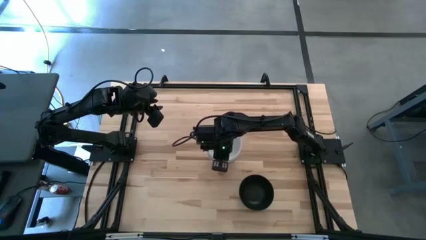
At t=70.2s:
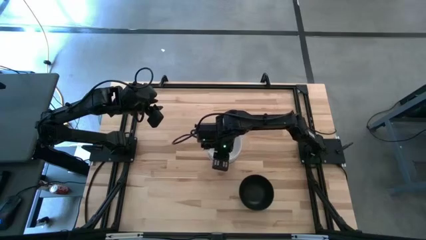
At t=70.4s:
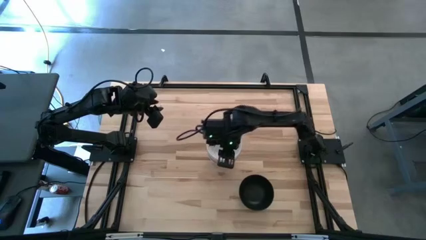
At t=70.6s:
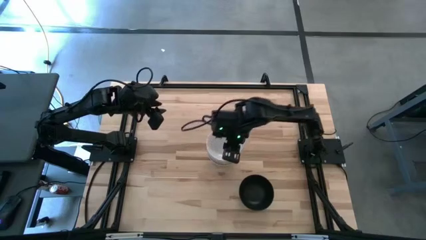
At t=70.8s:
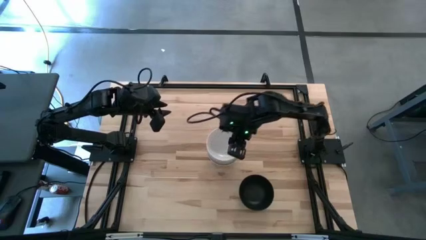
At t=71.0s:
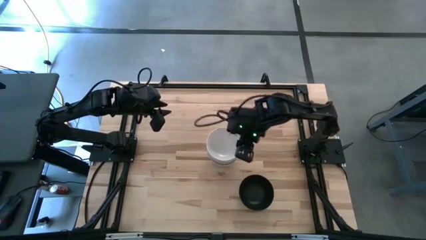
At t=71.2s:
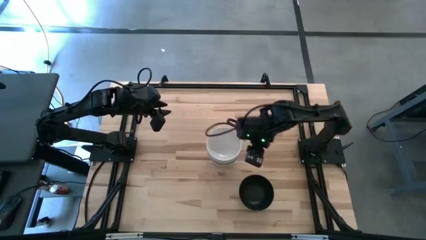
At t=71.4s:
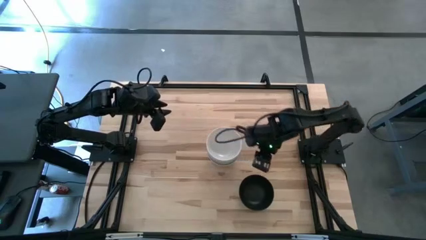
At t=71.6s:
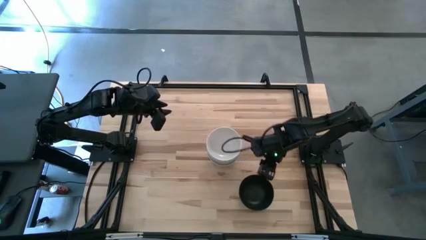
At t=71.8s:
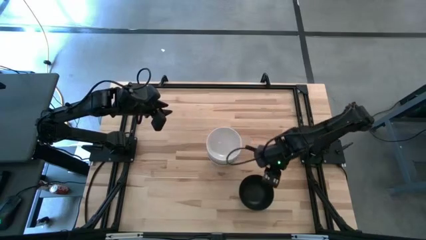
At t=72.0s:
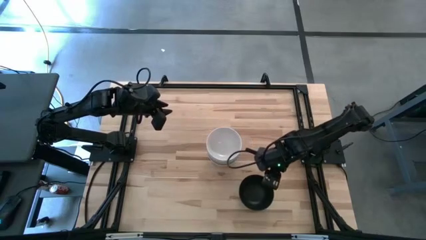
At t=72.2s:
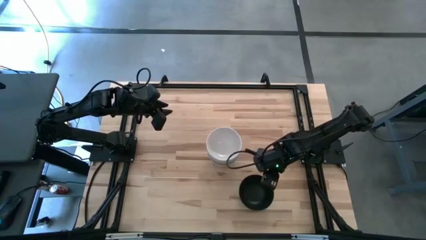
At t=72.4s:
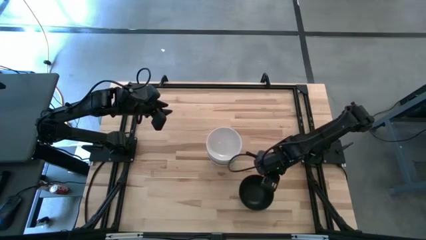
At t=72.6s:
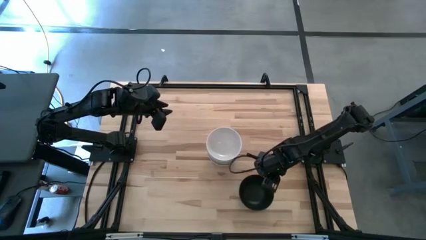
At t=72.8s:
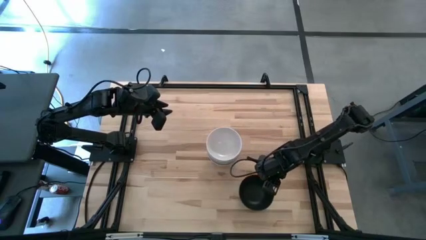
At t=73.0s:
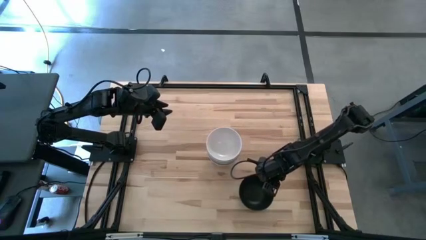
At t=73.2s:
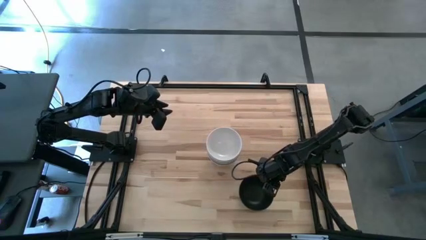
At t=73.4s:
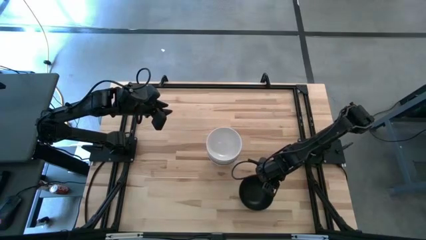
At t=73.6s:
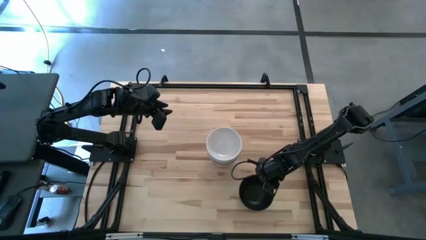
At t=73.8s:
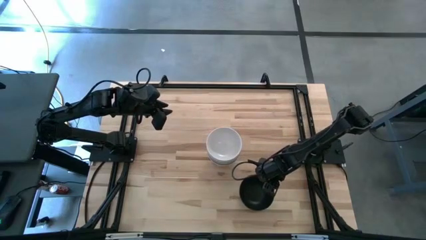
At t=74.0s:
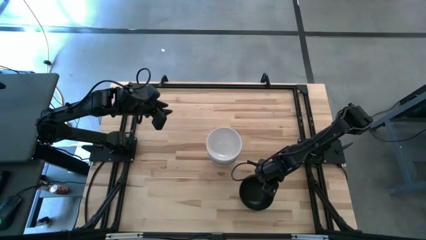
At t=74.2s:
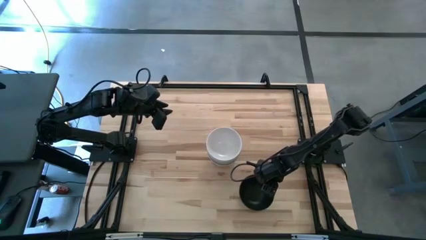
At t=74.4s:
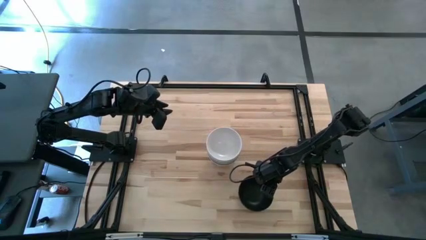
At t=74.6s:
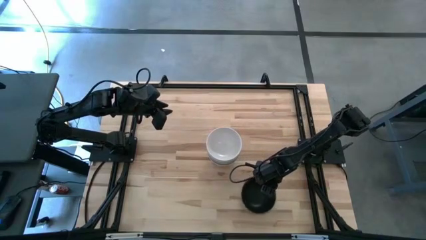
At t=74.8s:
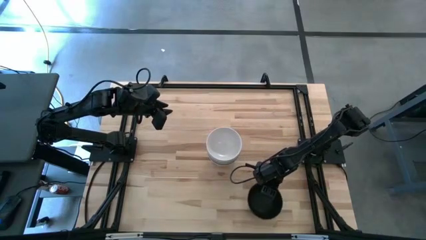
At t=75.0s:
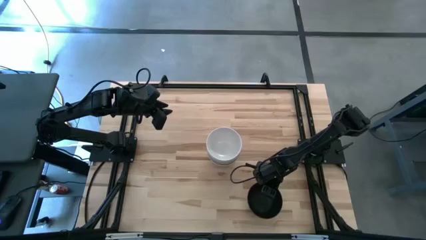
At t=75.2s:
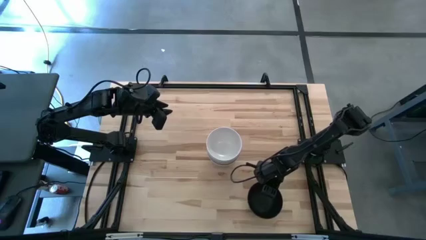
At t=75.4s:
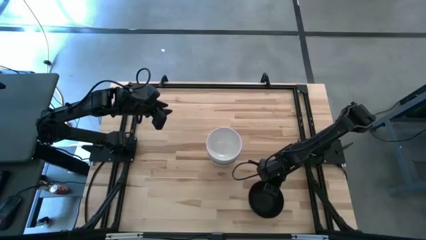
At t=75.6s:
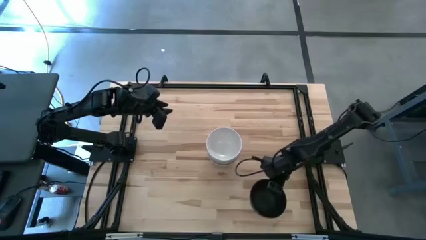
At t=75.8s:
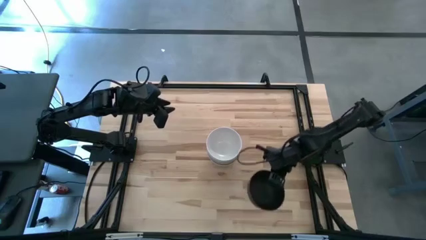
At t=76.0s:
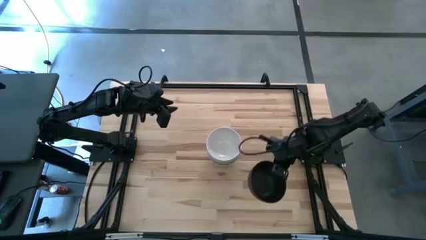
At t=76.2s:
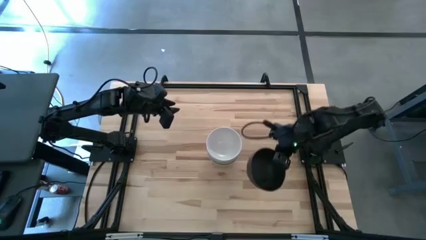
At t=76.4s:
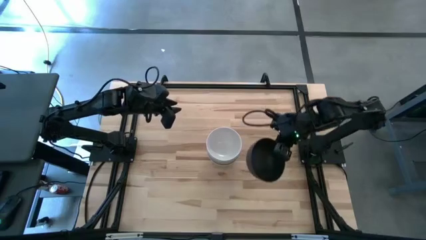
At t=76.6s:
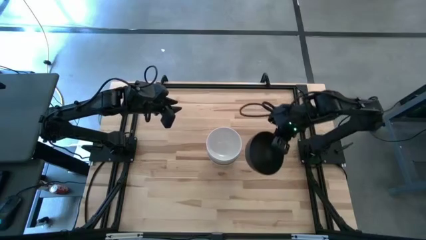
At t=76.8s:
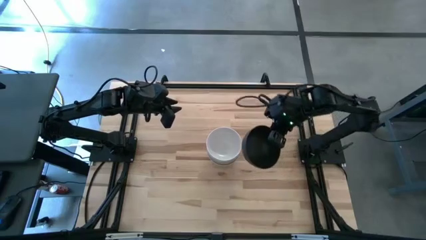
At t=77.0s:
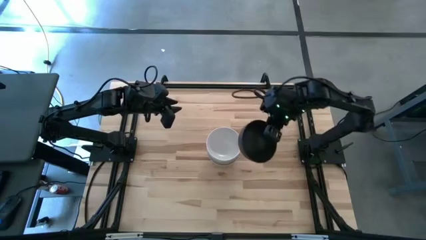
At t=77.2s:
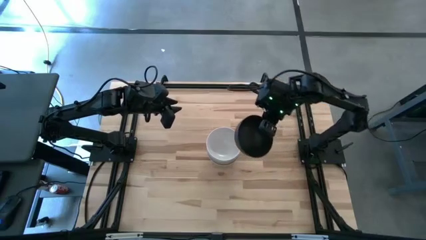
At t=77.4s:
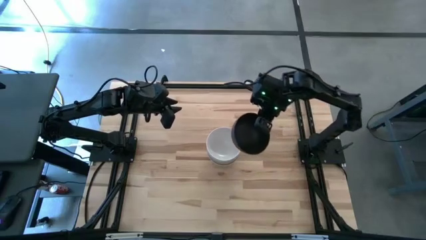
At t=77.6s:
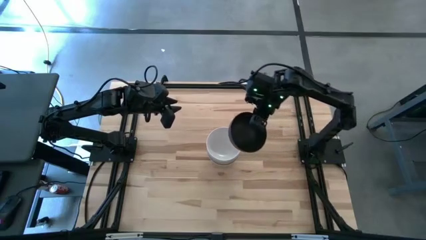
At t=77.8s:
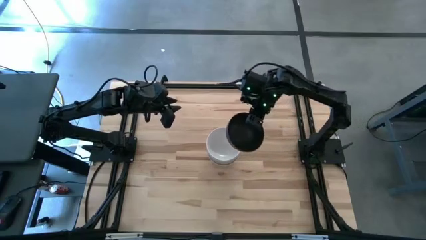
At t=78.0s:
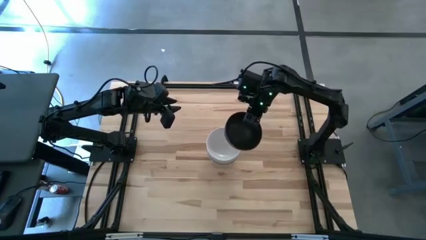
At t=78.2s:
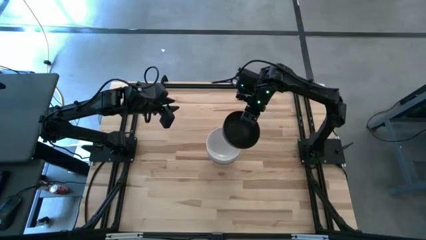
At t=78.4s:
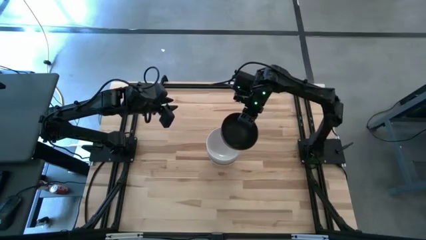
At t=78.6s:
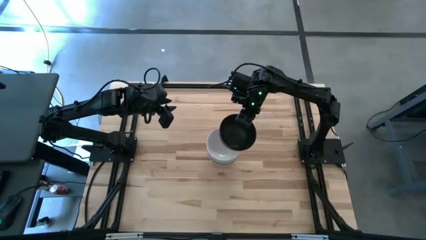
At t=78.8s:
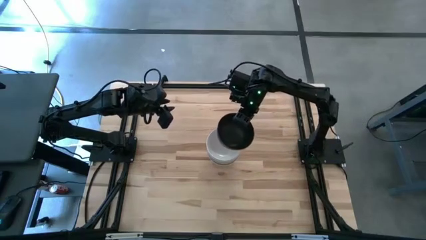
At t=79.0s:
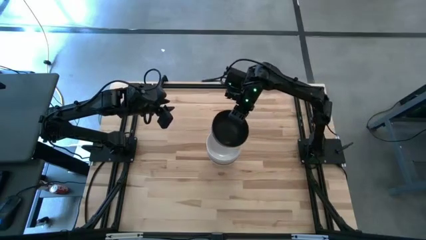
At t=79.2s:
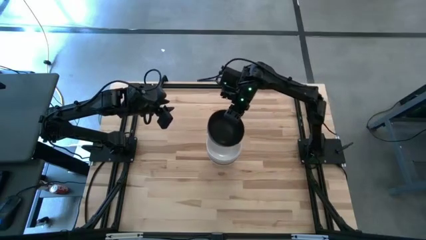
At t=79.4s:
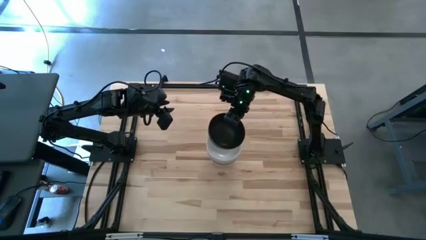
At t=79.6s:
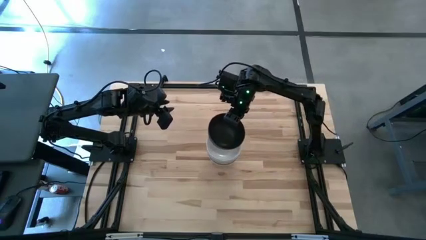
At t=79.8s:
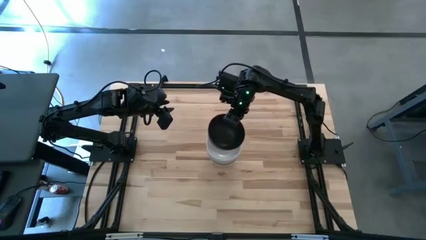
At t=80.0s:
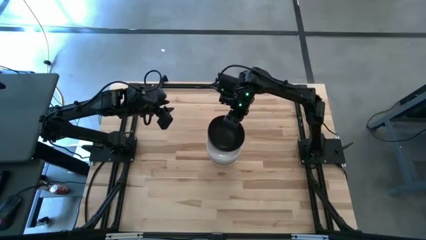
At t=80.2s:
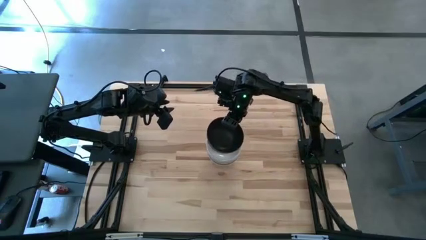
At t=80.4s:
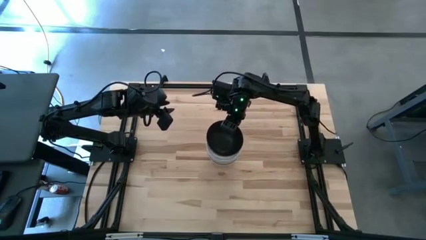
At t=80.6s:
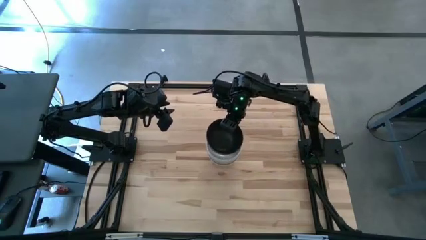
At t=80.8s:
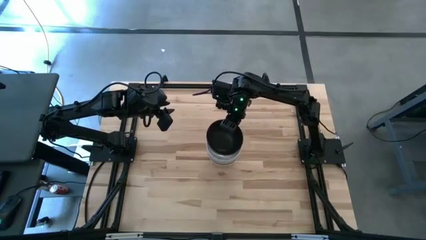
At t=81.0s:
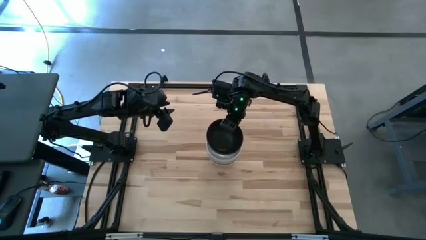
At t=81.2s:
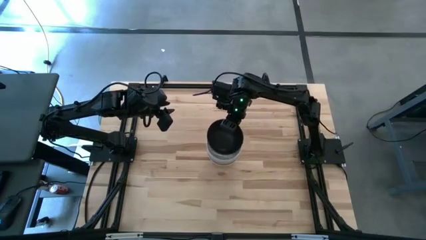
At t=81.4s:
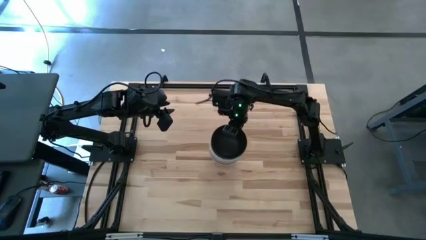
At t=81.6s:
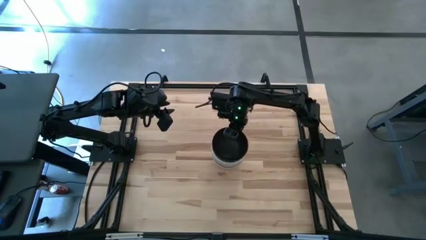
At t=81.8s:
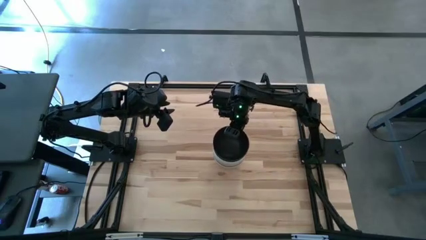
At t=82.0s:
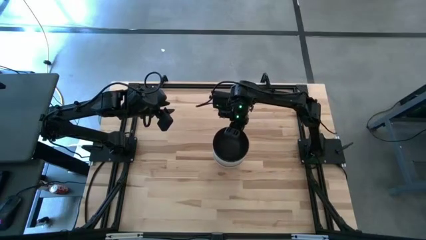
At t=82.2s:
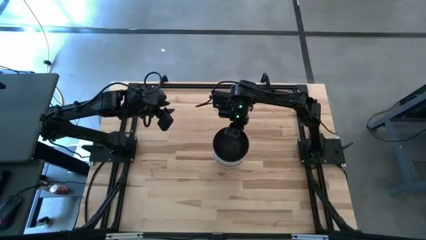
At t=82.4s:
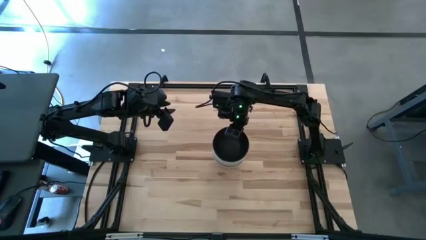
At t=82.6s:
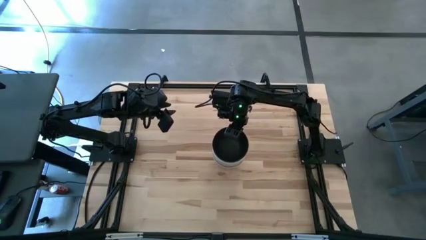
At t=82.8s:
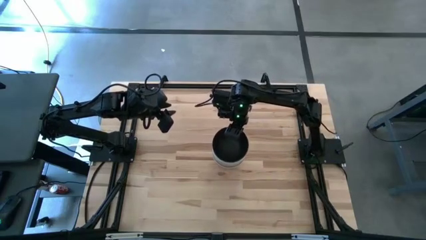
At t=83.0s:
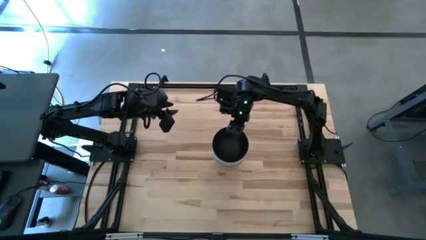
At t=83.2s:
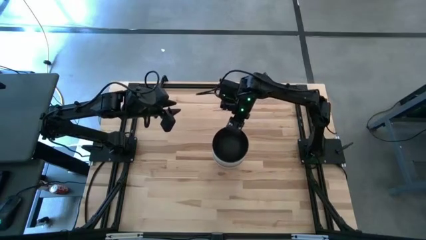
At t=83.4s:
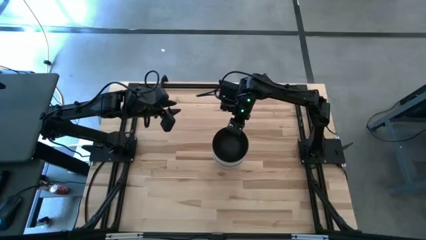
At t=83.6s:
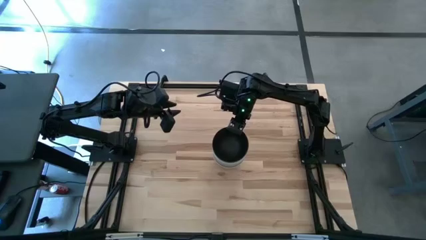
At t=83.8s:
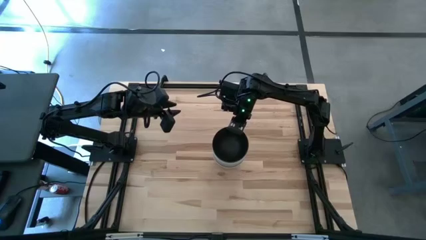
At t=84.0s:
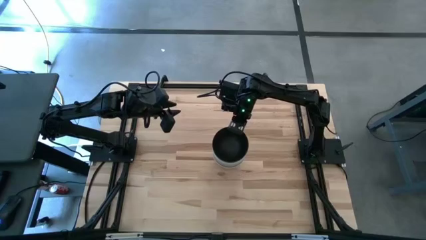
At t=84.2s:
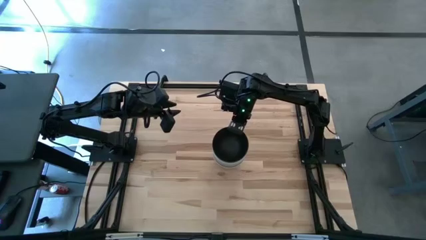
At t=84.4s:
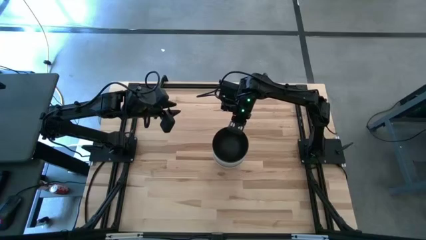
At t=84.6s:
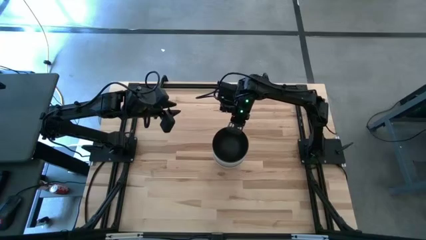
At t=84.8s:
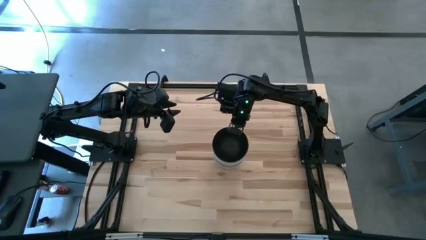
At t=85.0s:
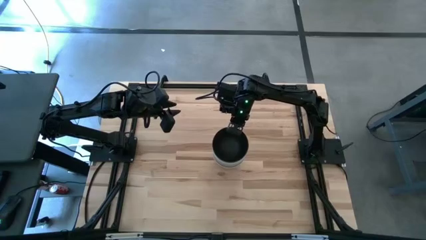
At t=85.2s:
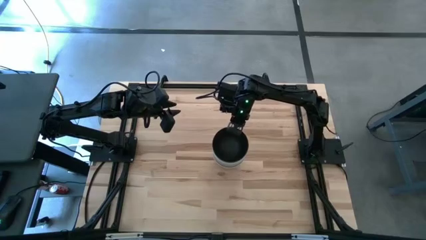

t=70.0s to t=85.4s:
Task: Nest bowls inside each other
Stack the black bowl on the white bowl
